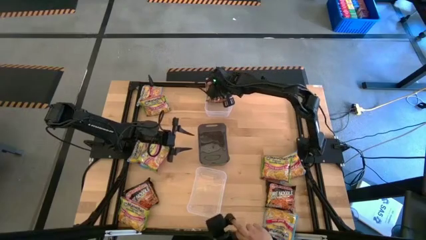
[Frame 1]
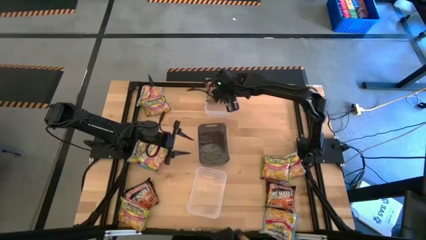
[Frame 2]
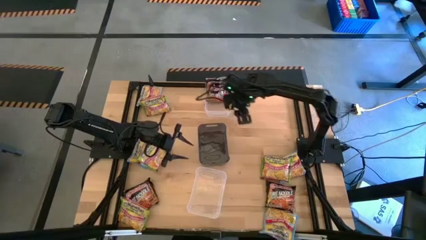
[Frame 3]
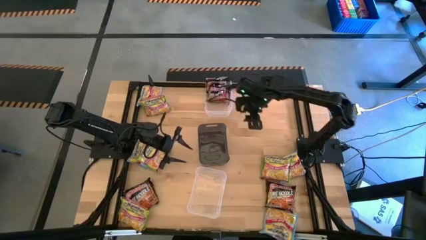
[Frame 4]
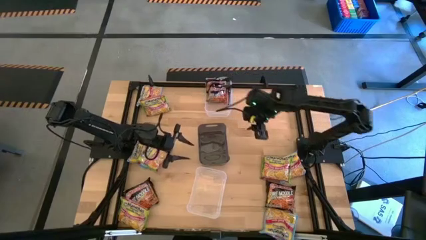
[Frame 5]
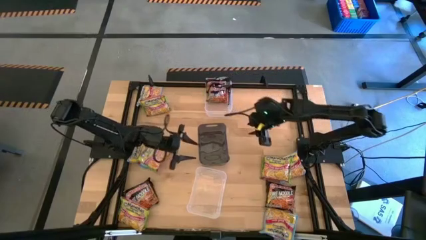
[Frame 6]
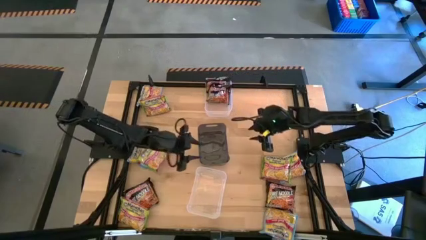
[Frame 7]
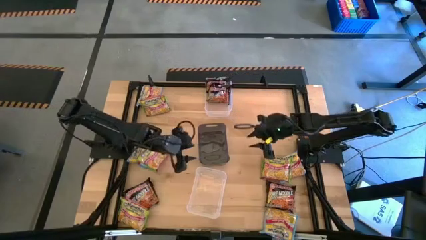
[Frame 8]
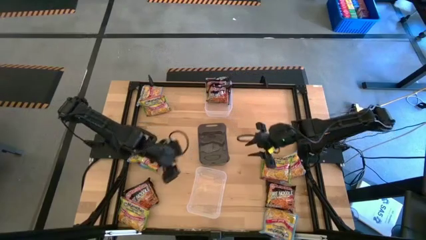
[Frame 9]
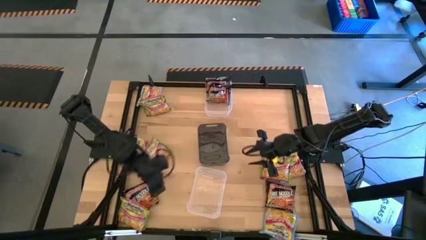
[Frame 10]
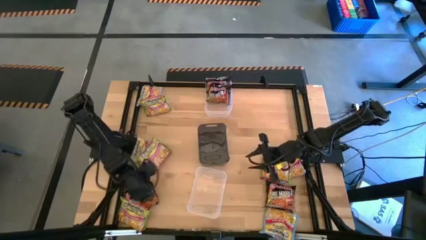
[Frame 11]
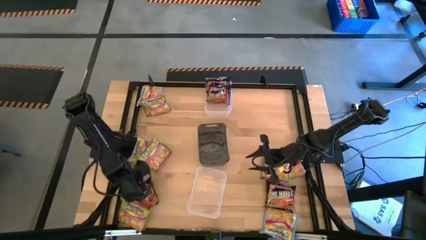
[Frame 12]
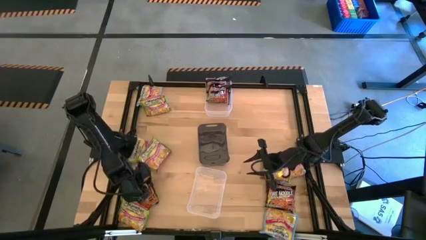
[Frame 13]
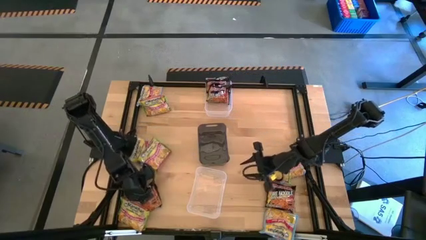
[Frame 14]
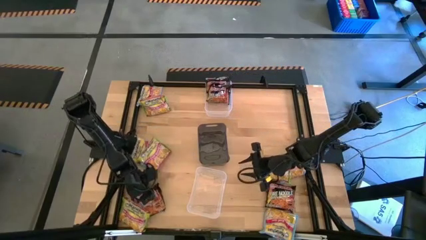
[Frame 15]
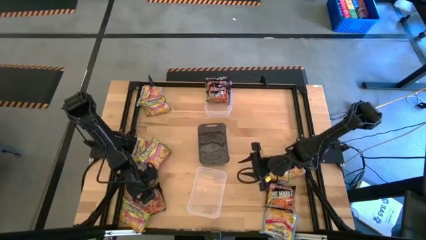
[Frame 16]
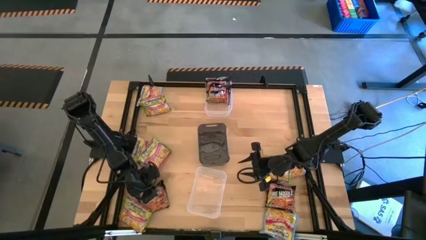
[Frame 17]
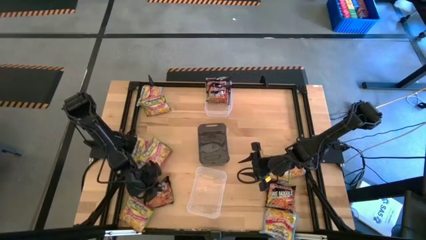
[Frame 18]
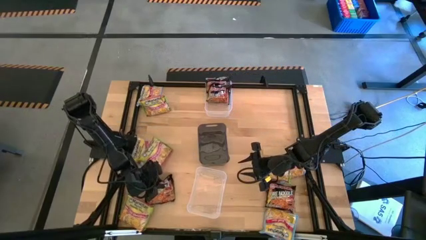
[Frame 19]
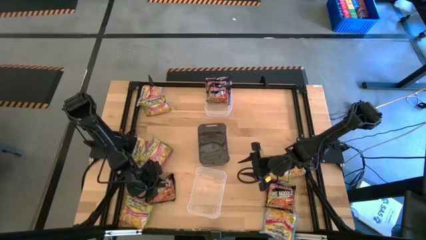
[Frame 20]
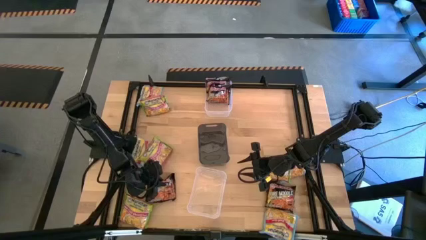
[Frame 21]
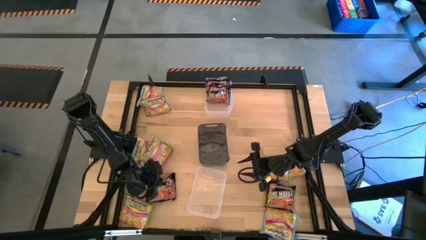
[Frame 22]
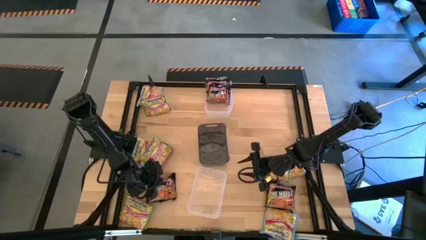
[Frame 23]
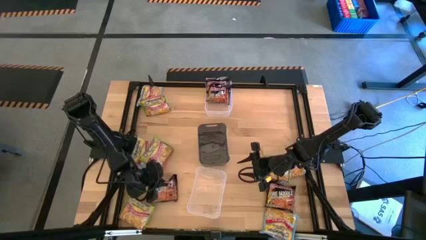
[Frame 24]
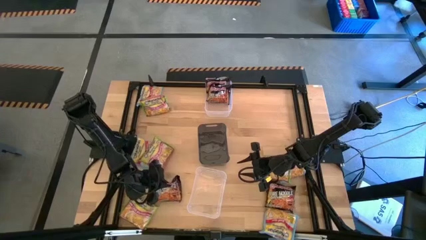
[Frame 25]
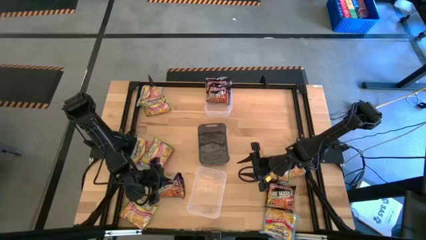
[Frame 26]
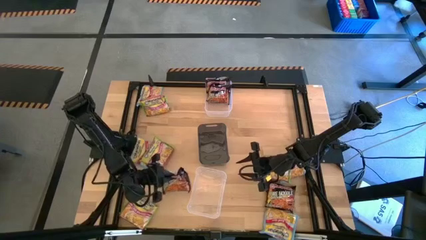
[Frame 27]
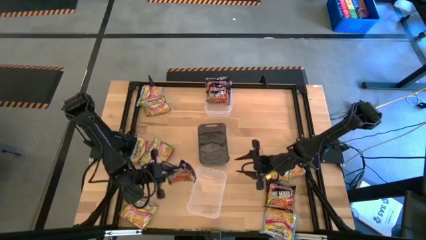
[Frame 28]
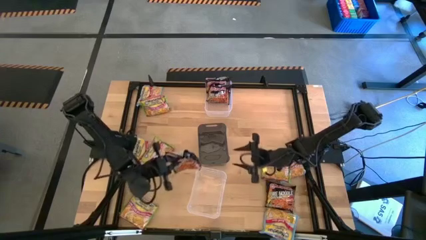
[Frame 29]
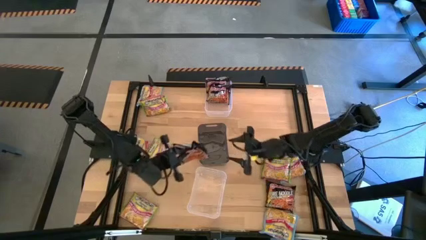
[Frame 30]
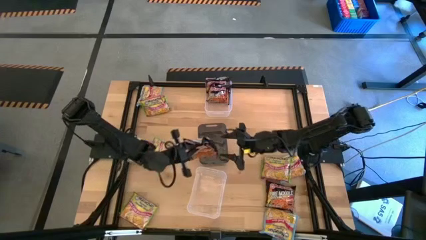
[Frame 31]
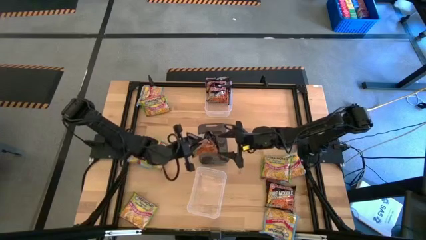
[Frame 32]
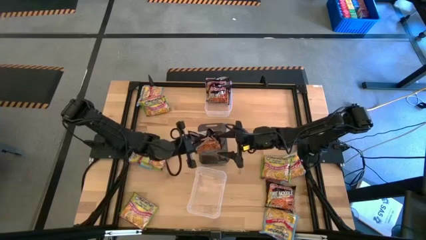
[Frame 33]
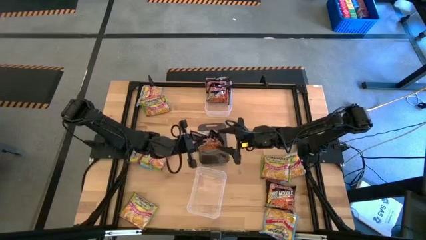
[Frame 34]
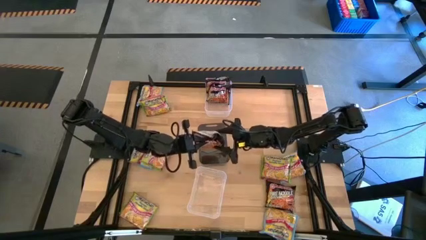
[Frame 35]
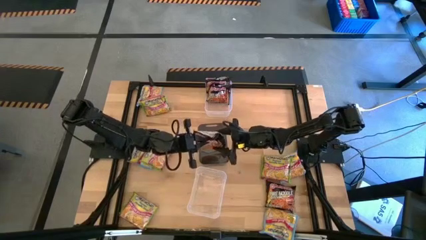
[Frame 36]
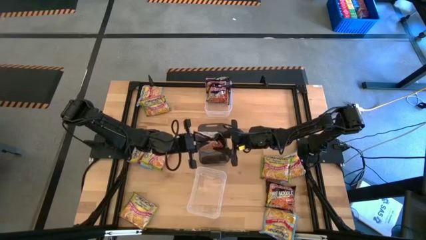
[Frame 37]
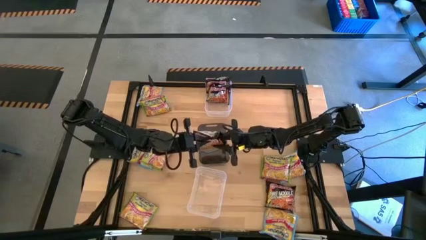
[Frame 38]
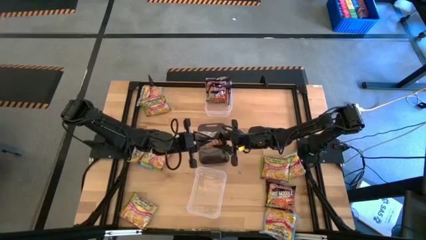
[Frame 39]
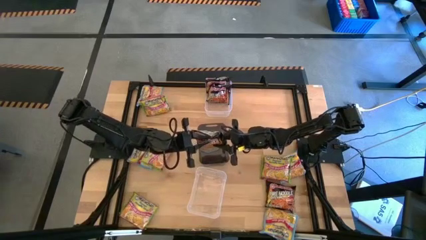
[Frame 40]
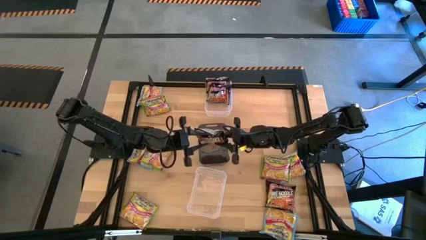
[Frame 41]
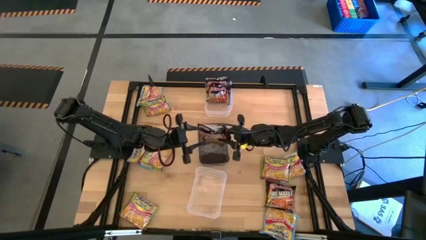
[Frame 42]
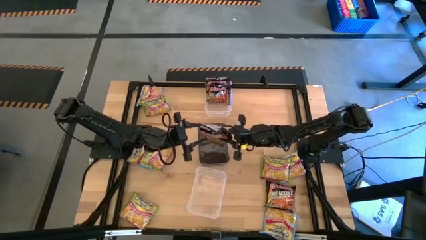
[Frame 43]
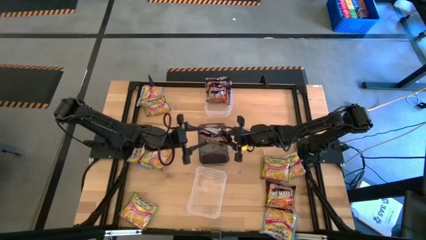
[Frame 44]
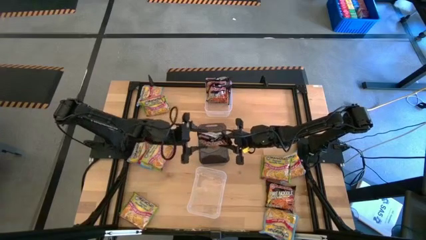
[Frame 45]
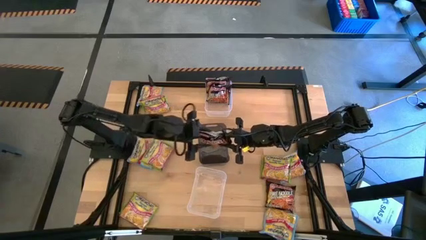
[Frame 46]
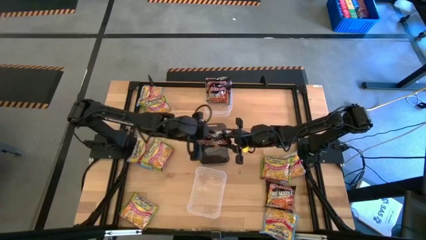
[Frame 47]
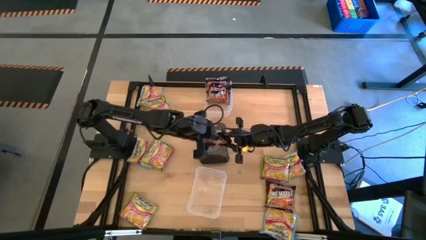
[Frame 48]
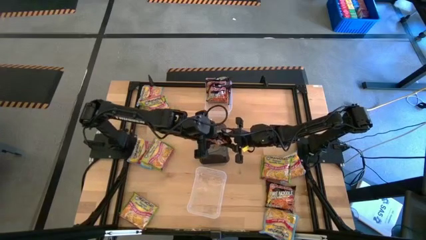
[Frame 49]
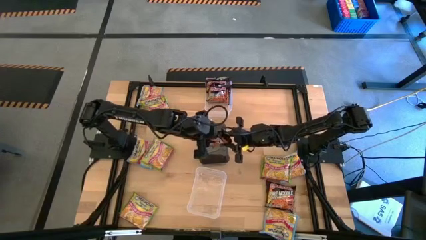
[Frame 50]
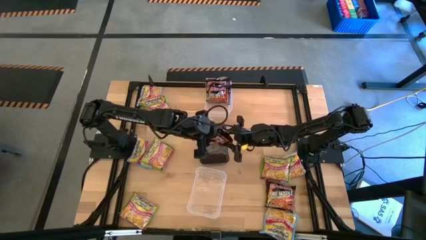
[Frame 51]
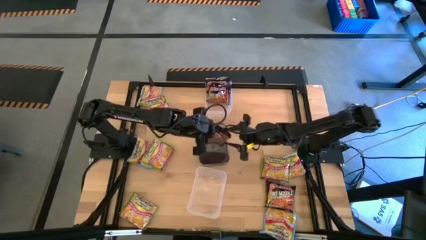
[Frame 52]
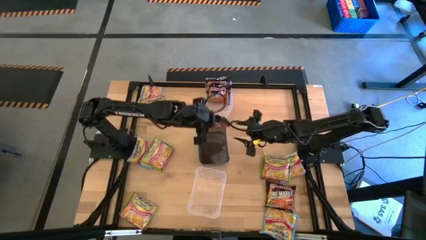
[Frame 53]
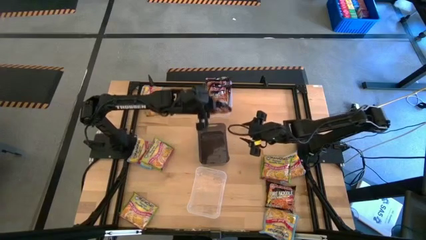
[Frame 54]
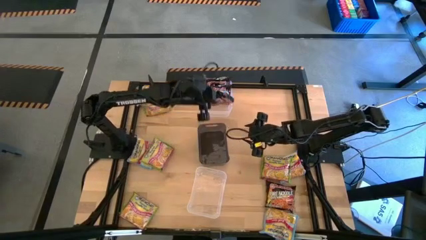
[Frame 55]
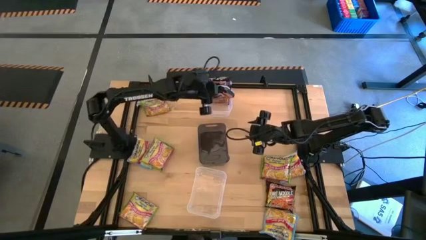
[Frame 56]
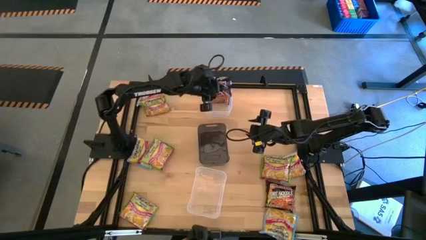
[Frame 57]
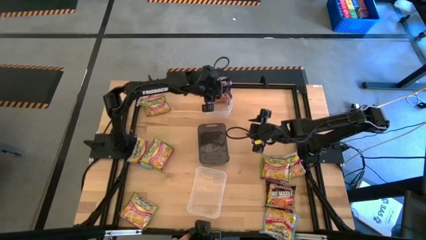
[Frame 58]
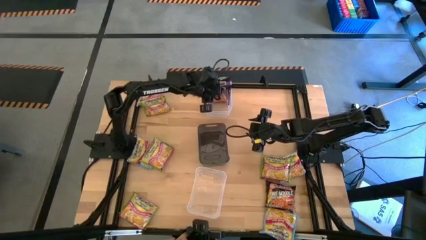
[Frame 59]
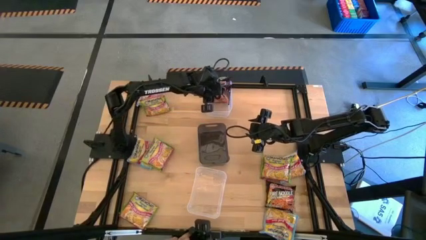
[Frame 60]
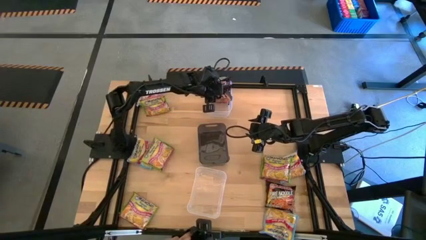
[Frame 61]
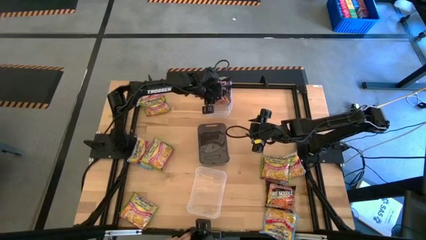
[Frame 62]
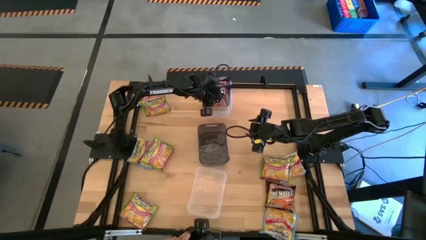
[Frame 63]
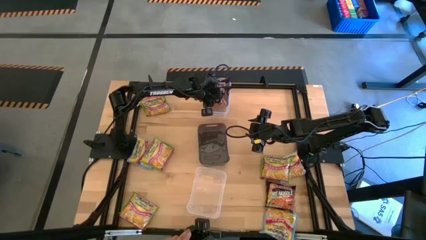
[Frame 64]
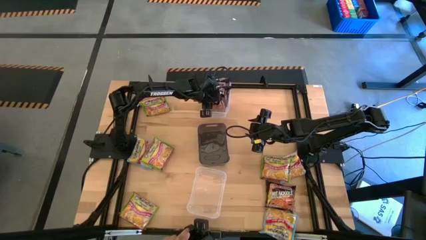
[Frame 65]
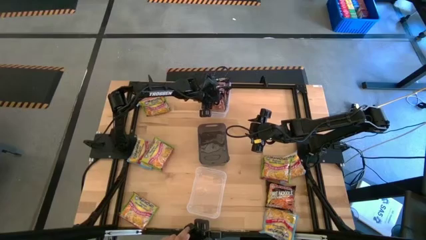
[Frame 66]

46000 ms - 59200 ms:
Task: Sort Maruchan noodles
Put the left black noodle pack into the top transparent bin

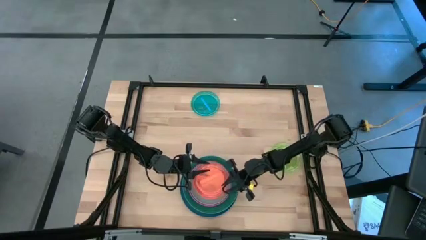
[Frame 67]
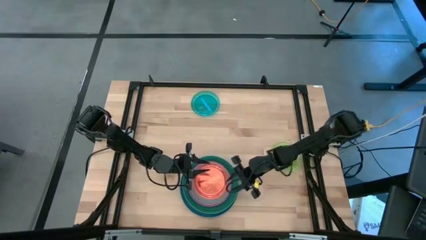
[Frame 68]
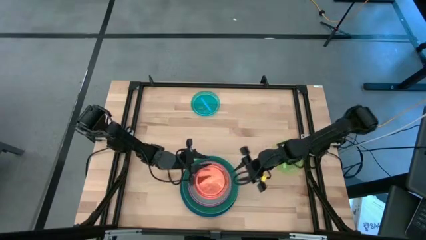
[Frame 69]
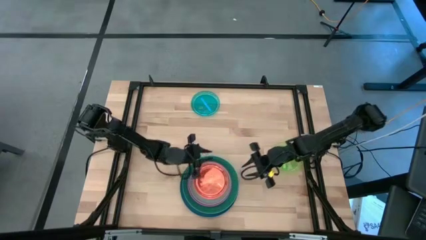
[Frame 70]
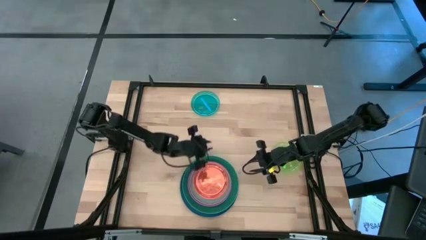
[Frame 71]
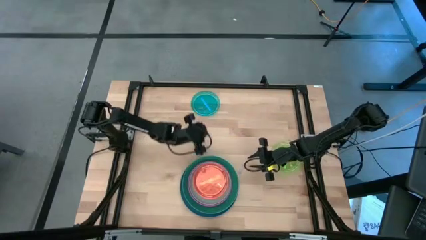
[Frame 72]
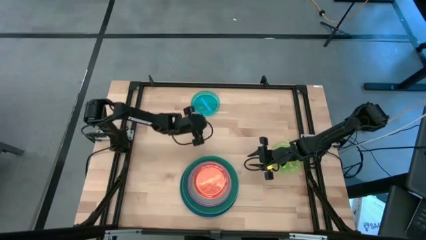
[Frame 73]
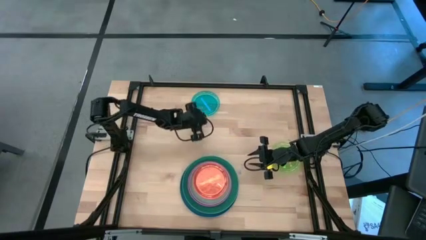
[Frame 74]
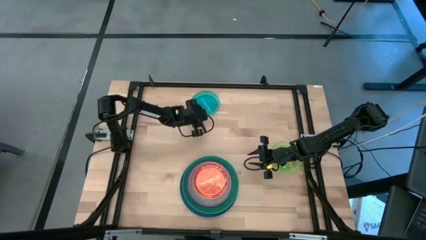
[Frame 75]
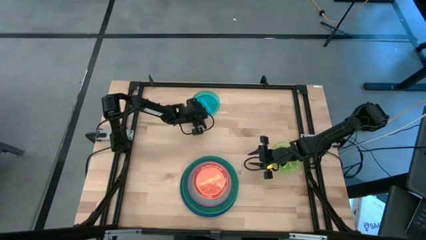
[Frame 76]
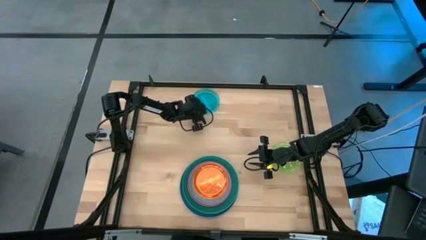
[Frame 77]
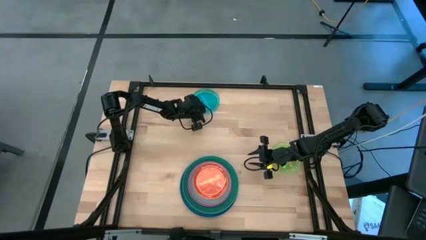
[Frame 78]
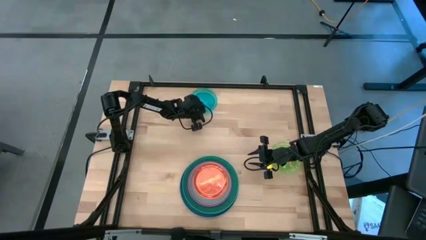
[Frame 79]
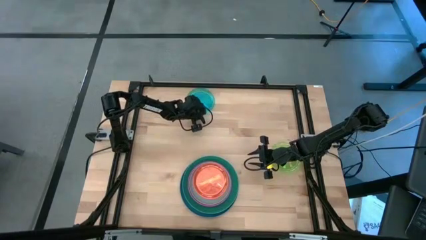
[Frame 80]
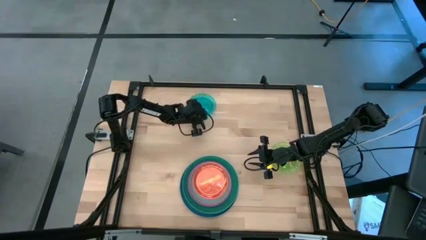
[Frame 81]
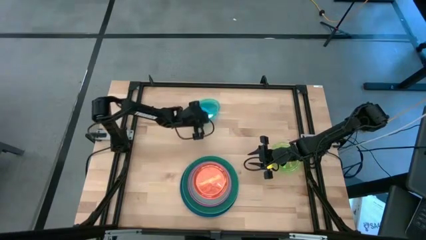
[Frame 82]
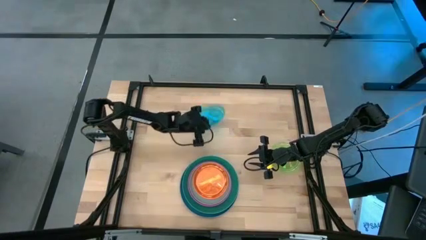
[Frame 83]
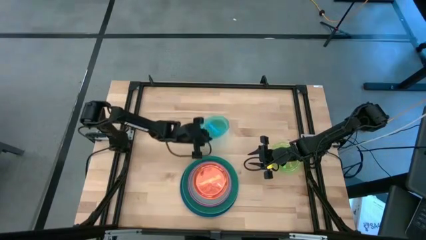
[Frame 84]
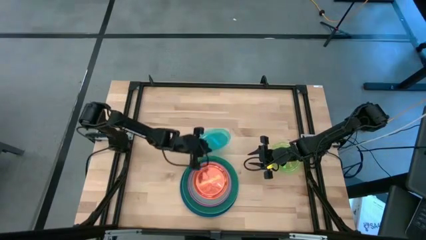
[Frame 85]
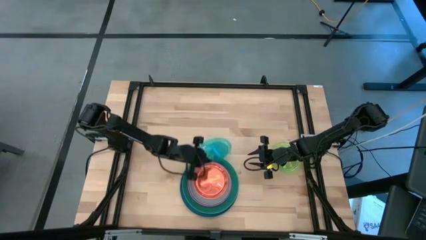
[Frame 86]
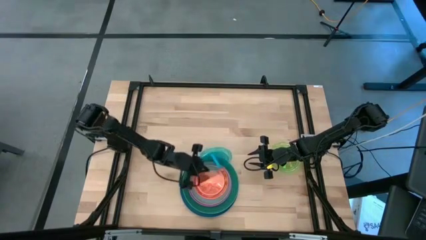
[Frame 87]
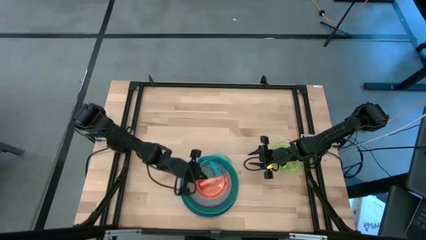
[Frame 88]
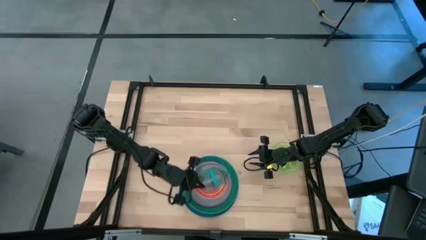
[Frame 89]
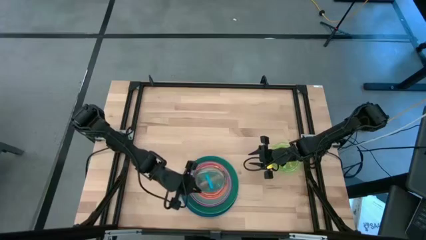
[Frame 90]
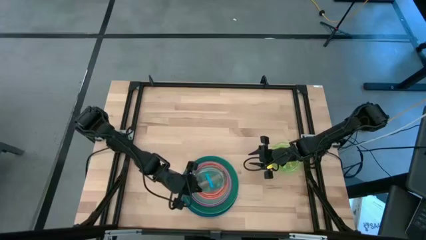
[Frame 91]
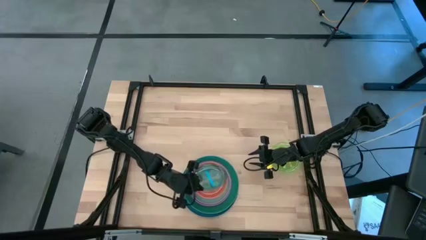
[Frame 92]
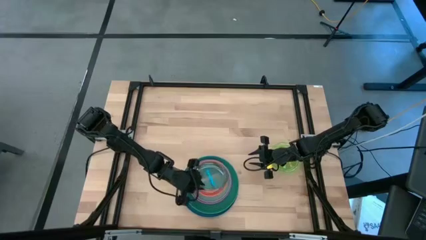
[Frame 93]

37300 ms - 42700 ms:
Task: Stack plastic plates
Stack the blue plate on the orange plate
